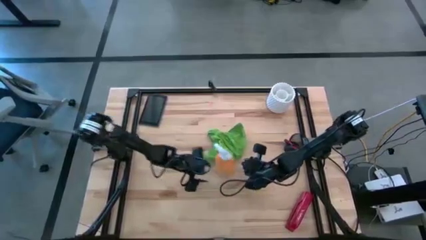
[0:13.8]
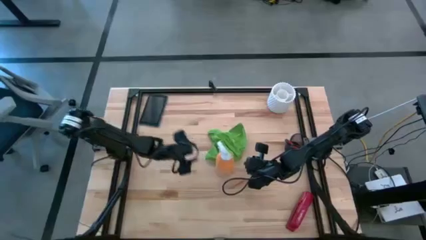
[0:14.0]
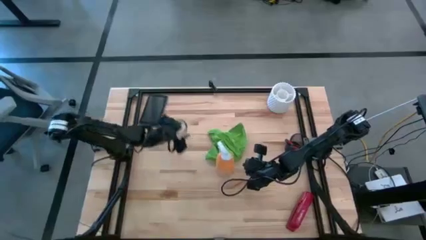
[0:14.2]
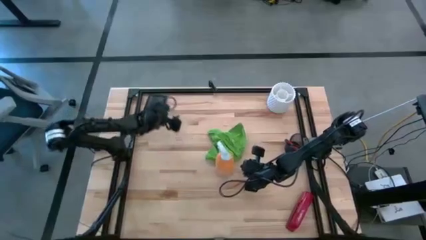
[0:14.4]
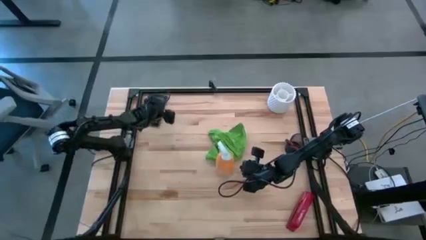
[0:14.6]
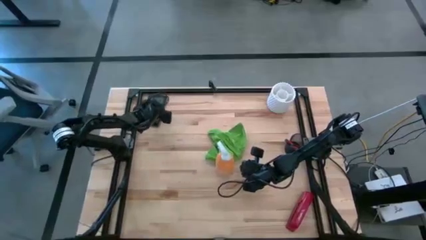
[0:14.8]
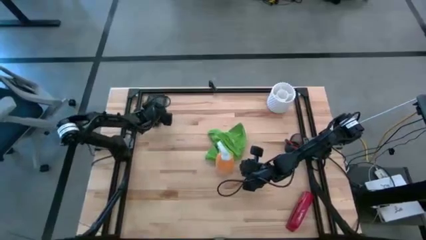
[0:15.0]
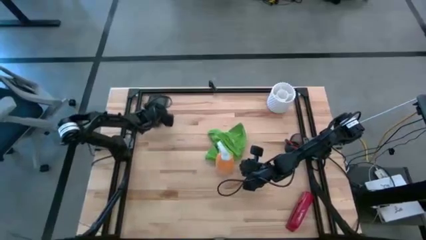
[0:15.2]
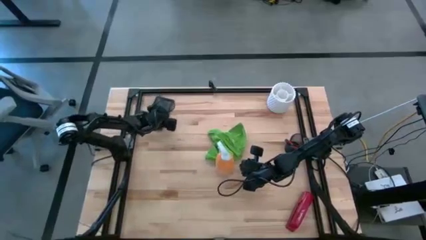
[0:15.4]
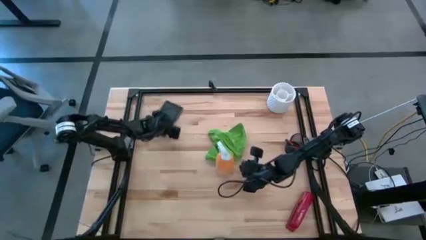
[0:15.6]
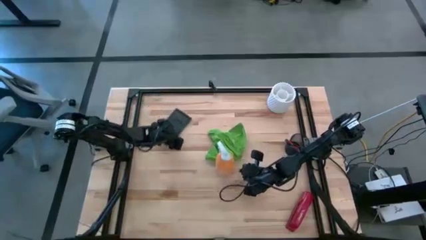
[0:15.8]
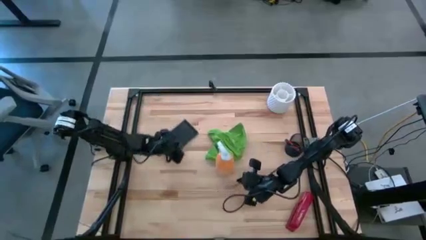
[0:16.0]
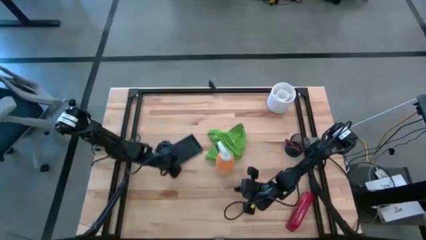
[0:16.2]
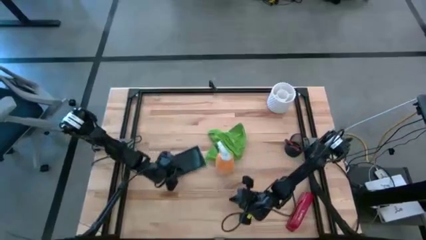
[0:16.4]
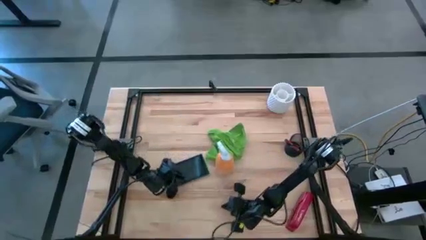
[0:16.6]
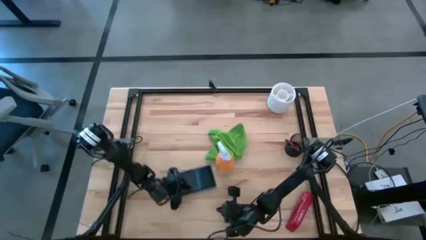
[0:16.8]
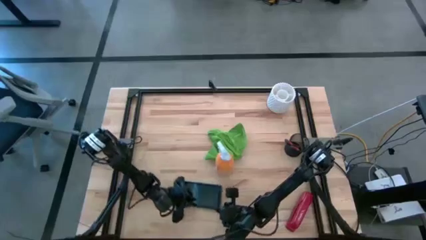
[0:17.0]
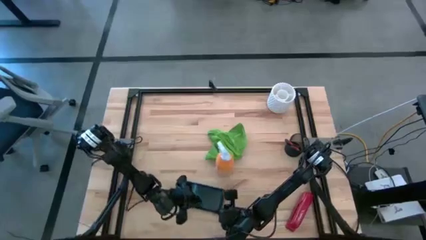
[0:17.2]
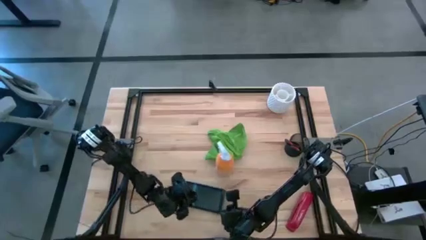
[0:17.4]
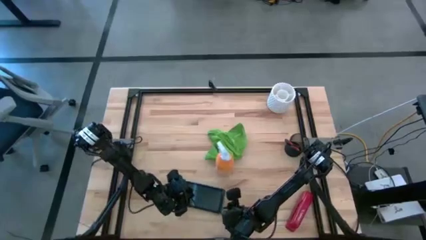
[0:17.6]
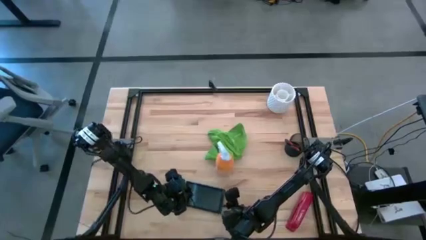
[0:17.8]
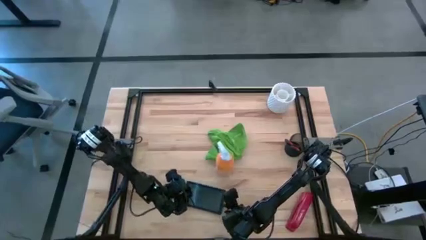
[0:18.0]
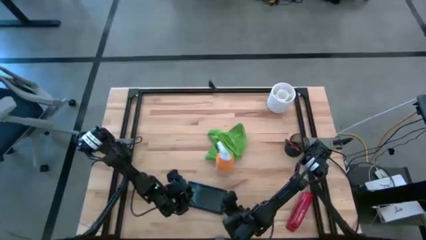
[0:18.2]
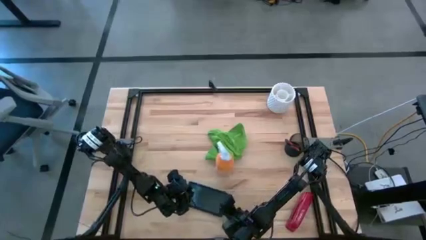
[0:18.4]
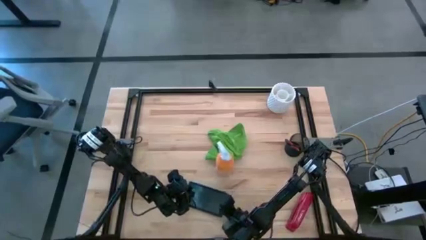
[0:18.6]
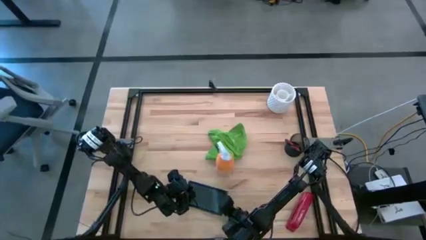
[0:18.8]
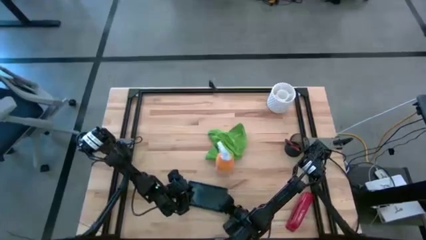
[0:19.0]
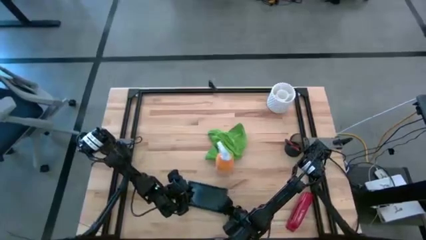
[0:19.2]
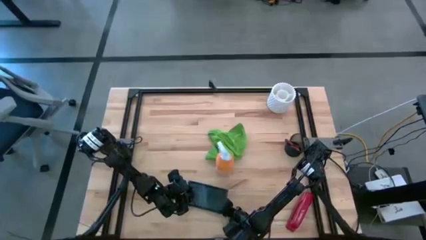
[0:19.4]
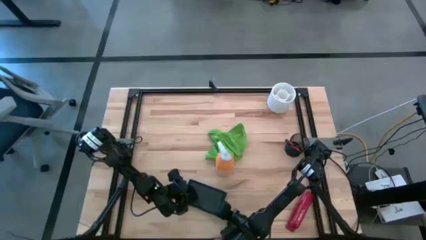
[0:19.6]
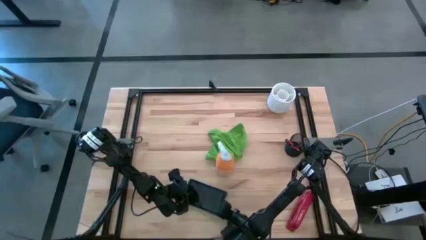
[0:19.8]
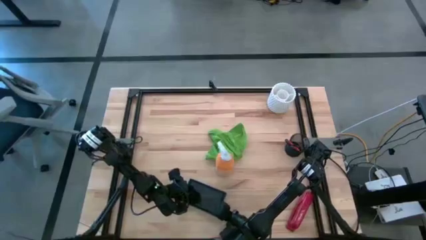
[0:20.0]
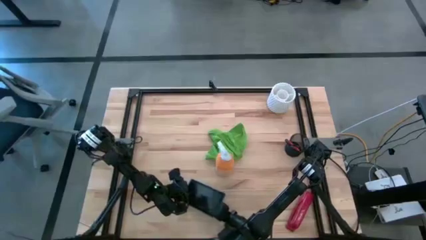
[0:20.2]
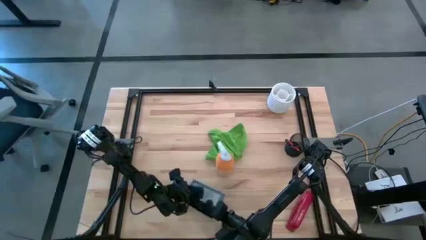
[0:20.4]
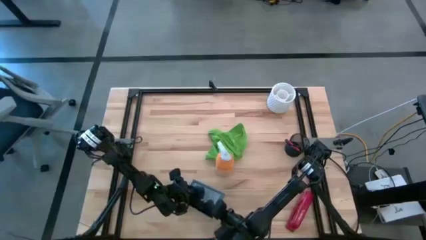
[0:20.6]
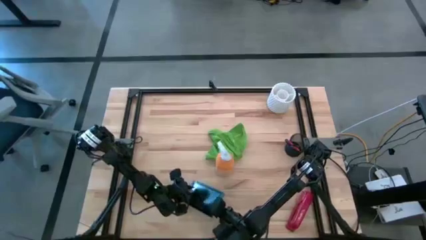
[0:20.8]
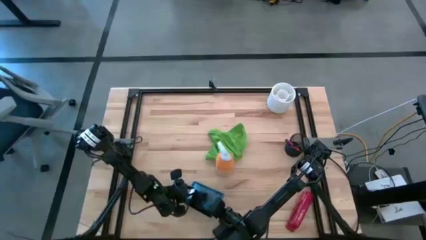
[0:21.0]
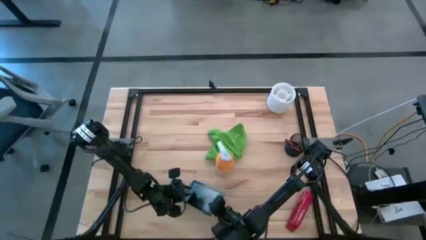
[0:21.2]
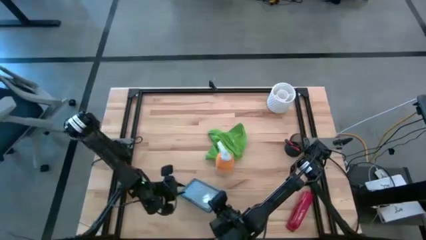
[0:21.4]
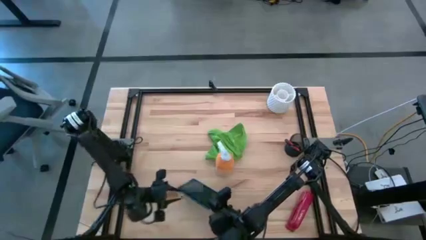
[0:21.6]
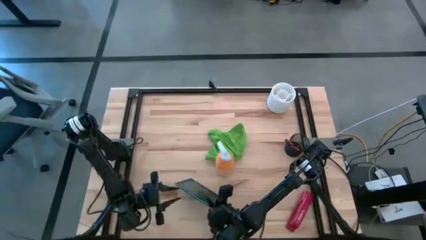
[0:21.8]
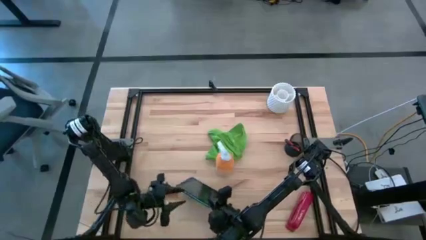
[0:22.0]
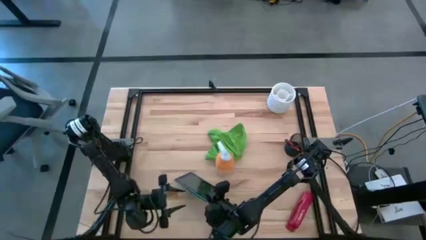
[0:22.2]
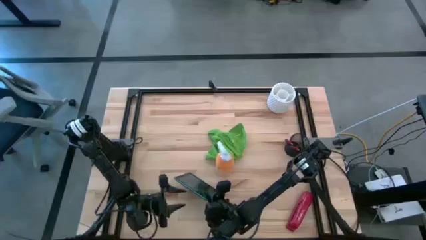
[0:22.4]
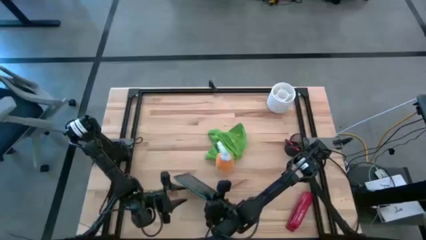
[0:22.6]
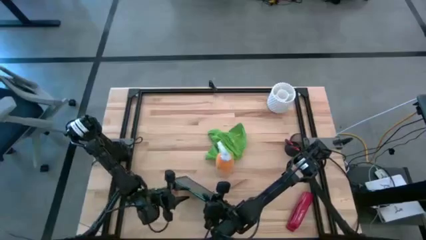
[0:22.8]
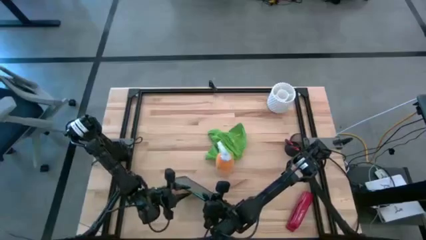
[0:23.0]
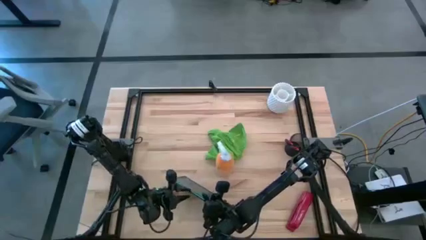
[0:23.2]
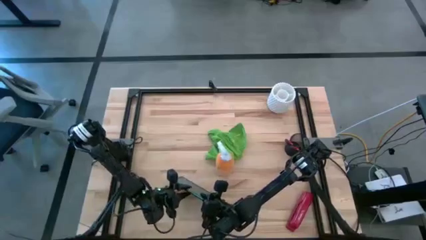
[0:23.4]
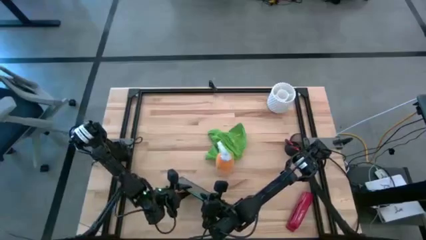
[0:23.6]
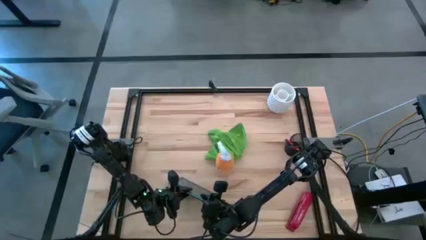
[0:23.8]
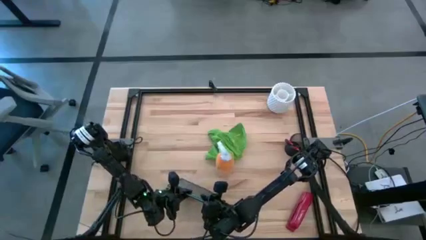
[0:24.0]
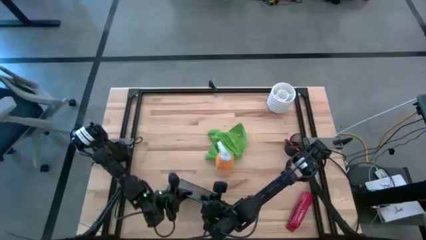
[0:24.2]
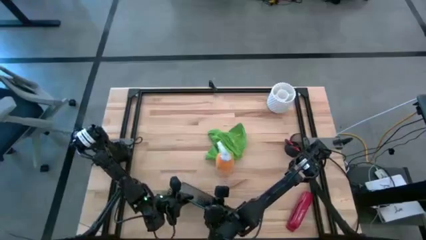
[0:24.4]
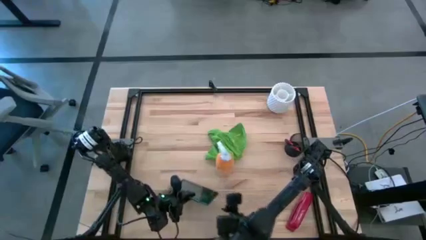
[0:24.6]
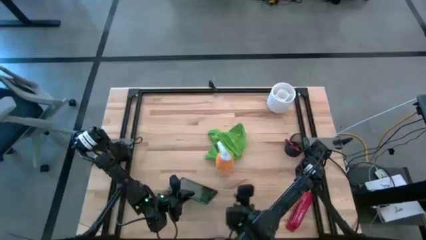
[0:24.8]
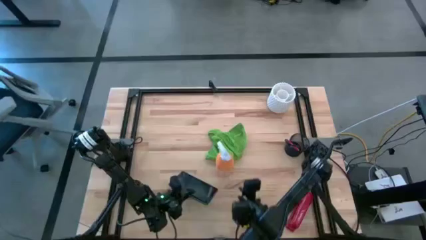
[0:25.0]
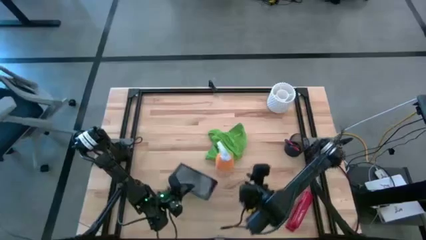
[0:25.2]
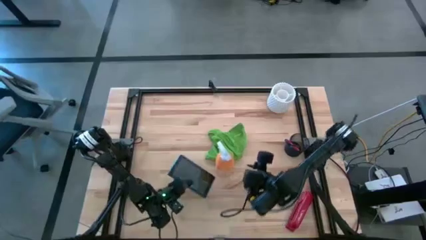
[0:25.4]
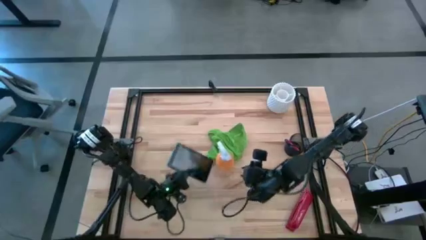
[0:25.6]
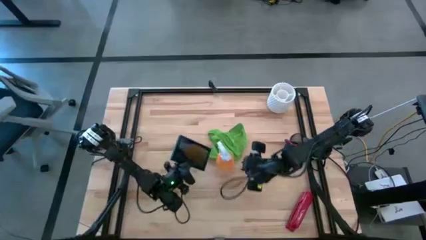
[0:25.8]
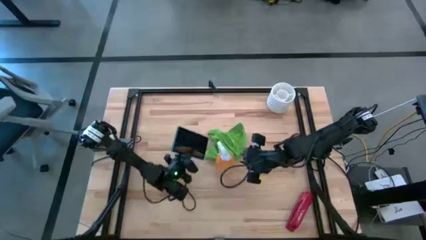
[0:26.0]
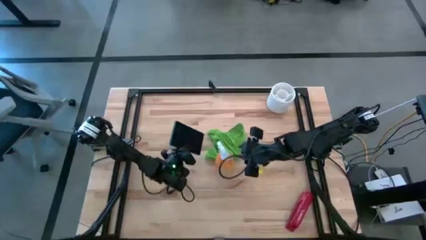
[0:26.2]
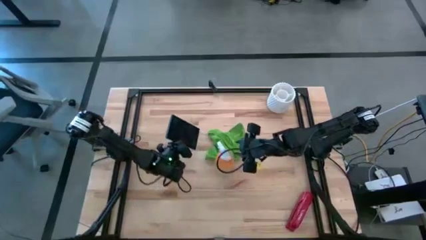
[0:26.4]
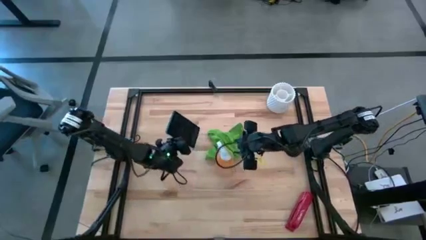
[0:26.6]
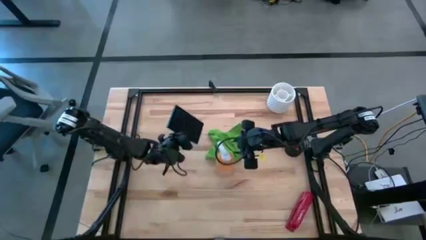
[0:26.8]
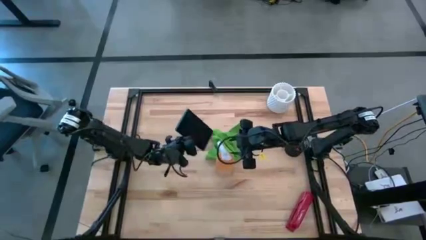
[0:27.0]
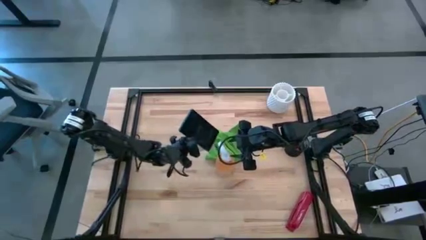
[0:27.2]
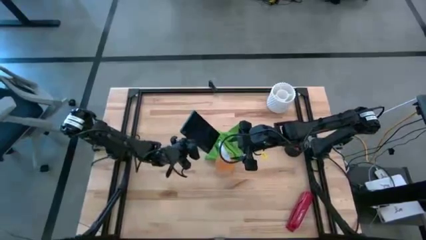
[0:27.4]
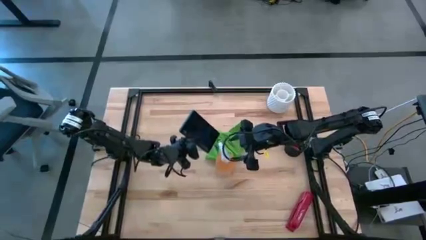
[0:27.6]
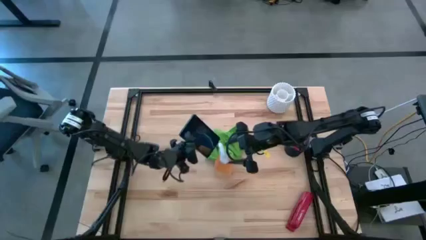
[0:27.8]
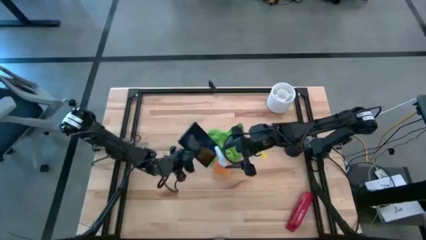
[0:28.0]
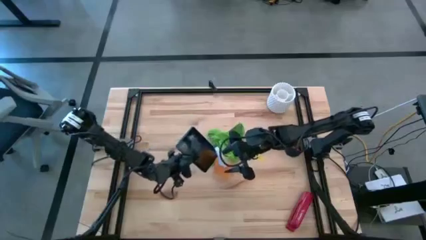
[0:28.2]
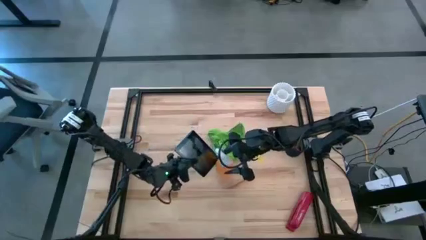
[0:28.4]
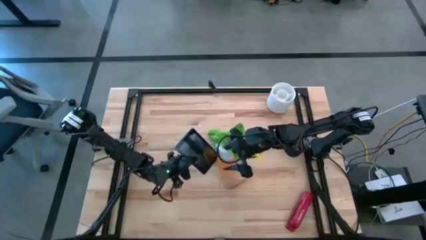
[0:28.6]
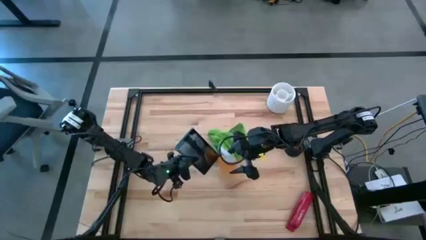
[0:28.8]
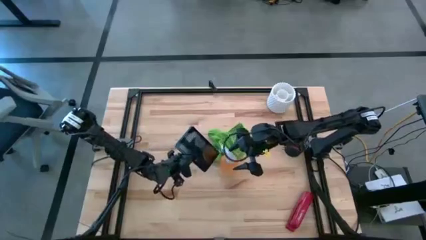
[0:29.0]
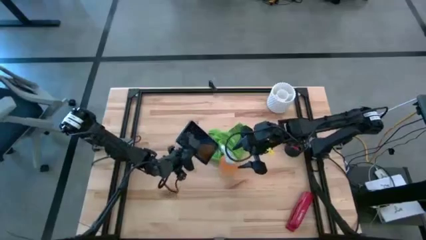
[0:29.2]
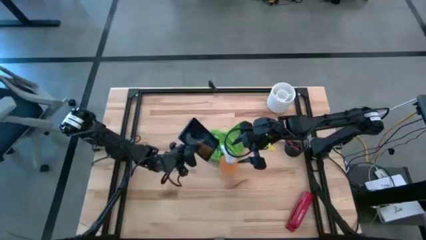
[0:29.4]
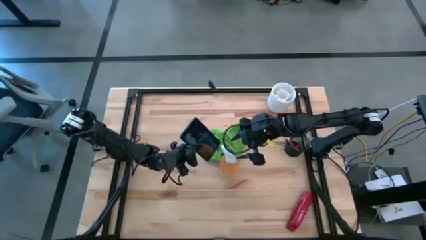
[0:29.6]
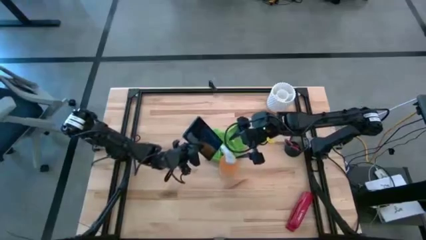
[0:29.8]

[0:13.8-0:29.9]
Task: Apply microfiber cloth
Spray the front and back of the tablet with the spray bottle
